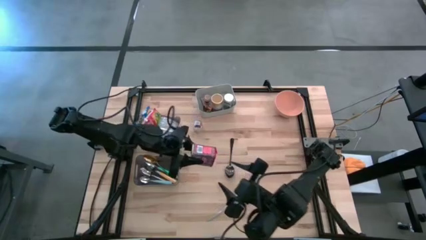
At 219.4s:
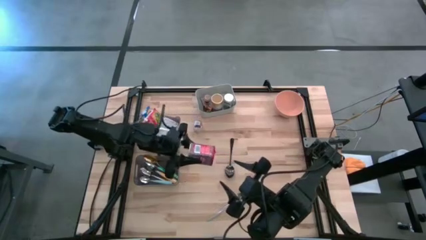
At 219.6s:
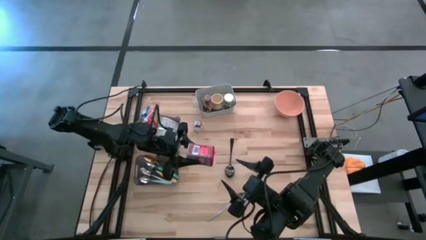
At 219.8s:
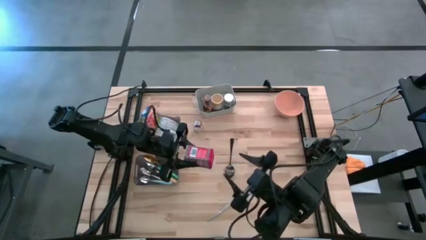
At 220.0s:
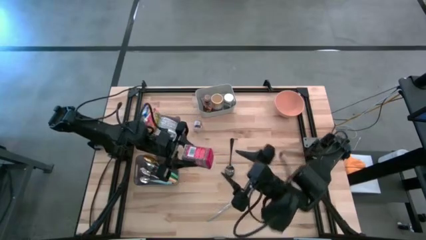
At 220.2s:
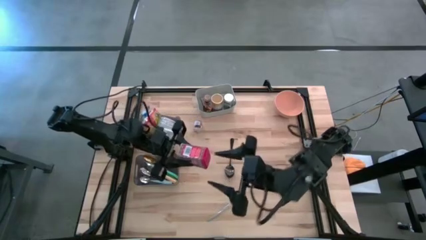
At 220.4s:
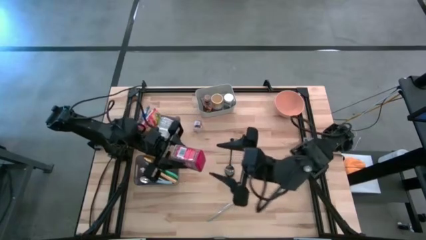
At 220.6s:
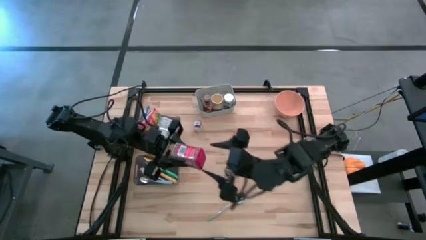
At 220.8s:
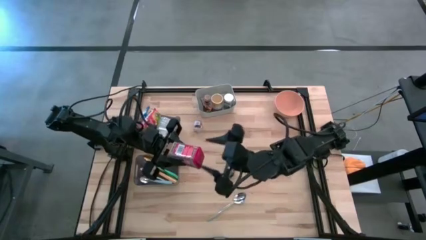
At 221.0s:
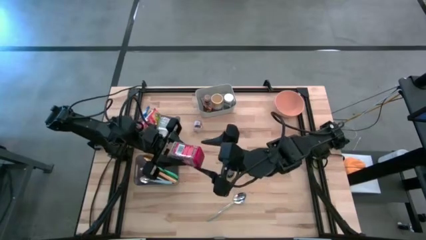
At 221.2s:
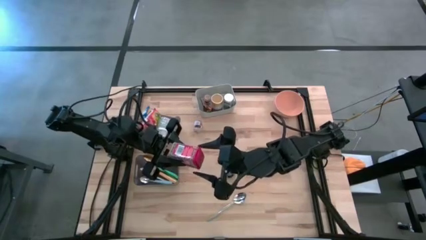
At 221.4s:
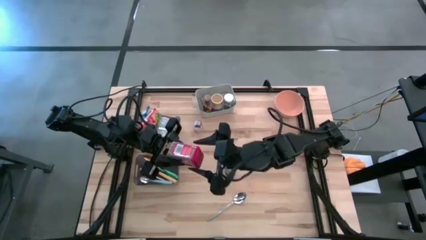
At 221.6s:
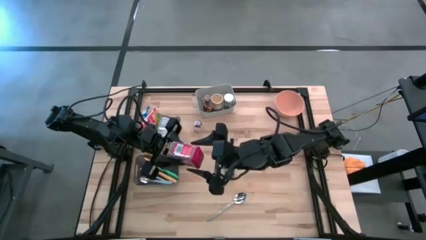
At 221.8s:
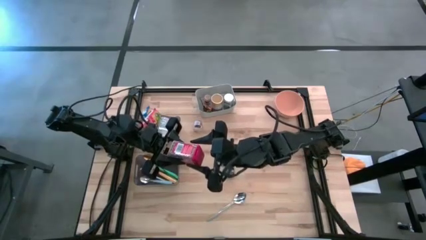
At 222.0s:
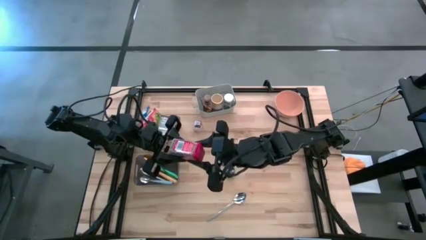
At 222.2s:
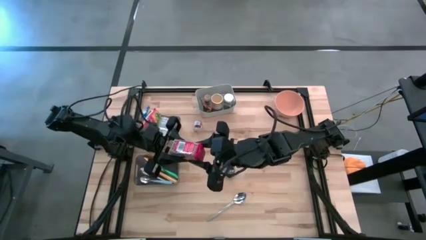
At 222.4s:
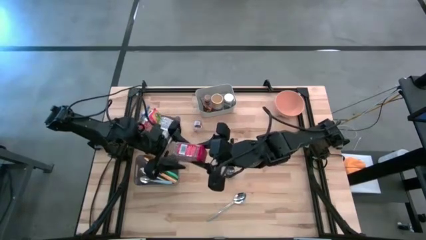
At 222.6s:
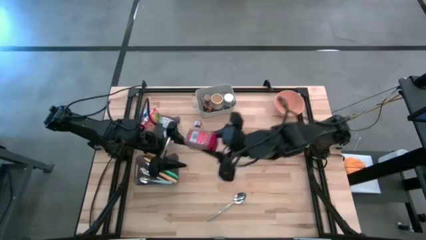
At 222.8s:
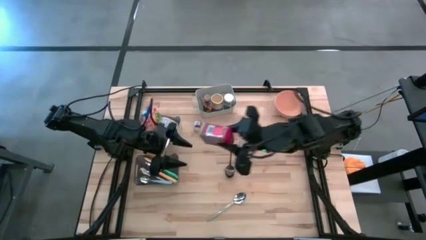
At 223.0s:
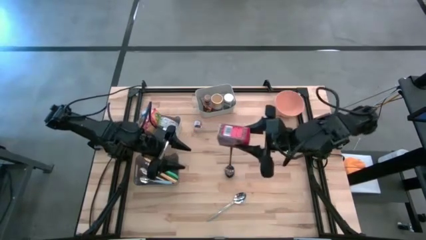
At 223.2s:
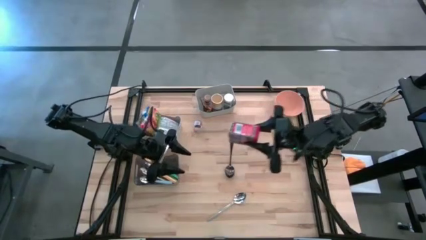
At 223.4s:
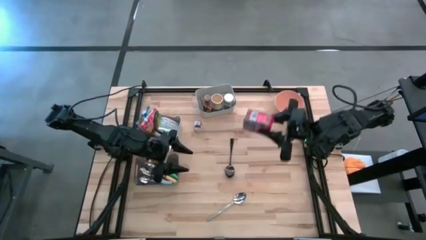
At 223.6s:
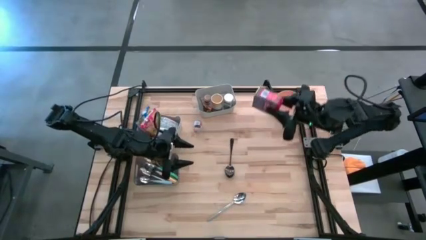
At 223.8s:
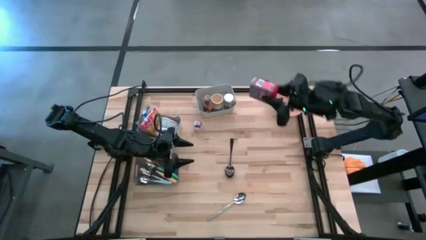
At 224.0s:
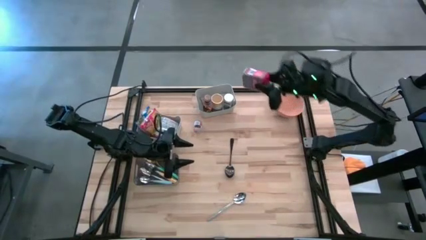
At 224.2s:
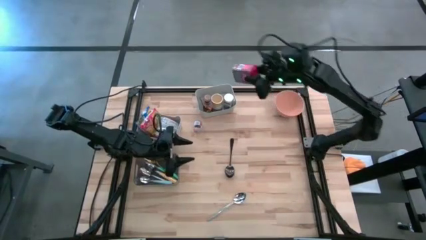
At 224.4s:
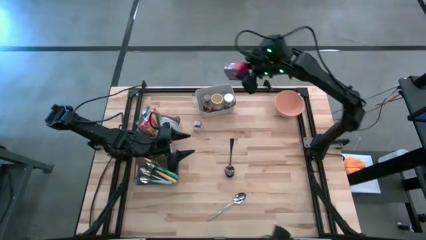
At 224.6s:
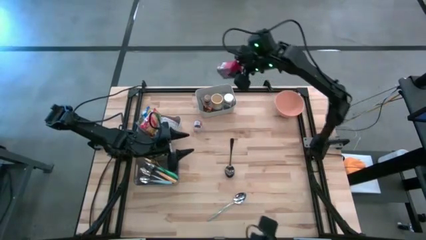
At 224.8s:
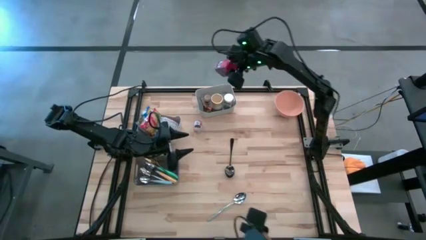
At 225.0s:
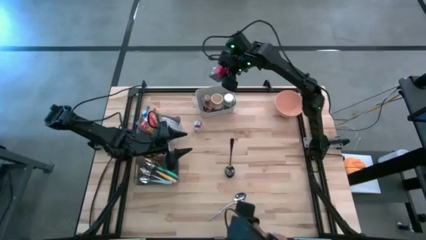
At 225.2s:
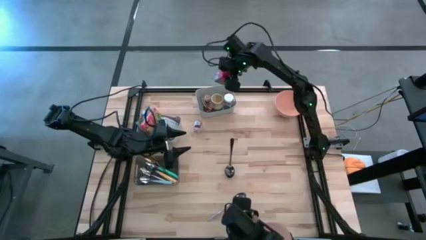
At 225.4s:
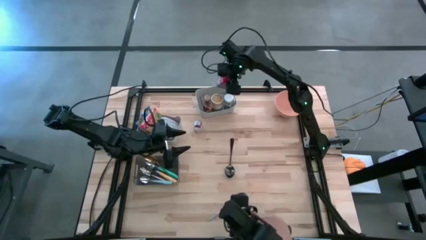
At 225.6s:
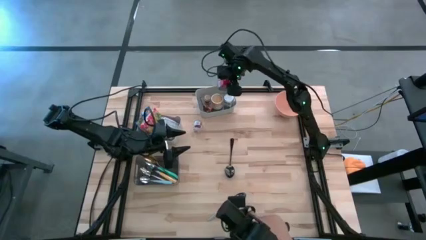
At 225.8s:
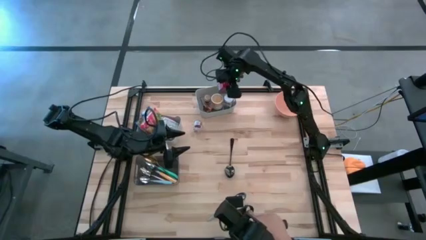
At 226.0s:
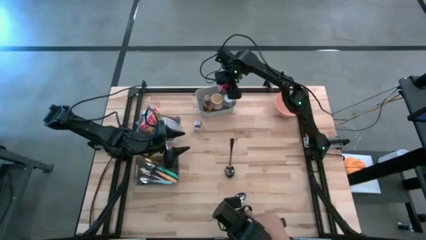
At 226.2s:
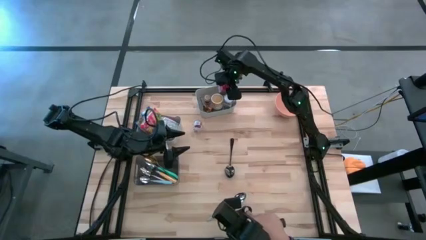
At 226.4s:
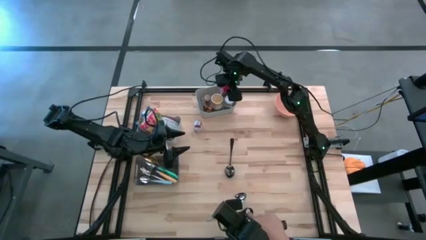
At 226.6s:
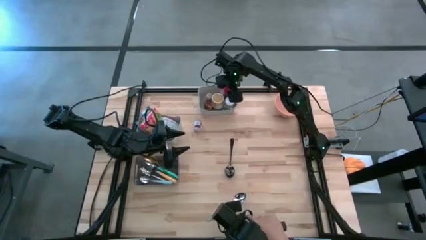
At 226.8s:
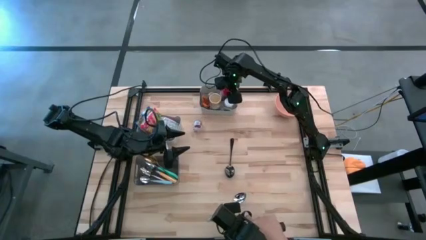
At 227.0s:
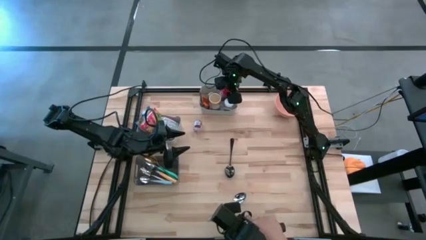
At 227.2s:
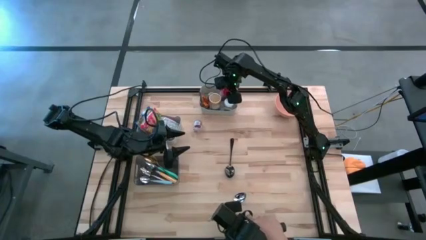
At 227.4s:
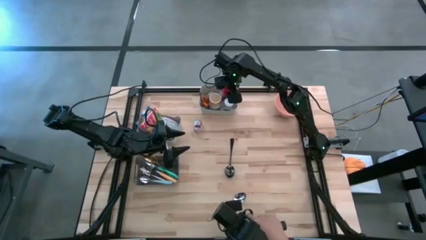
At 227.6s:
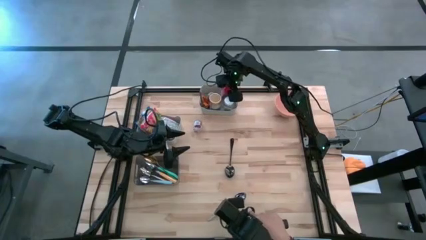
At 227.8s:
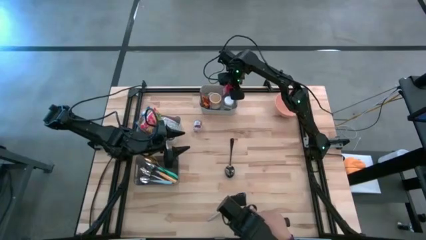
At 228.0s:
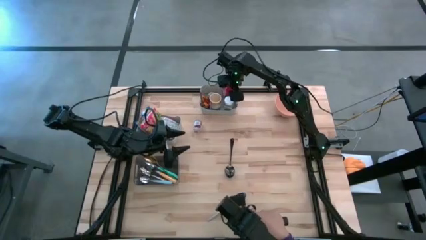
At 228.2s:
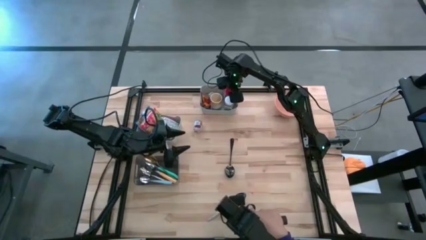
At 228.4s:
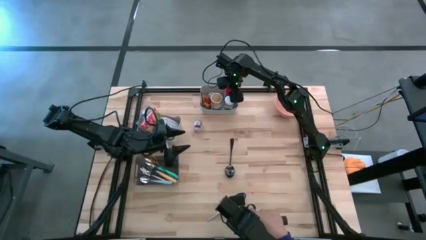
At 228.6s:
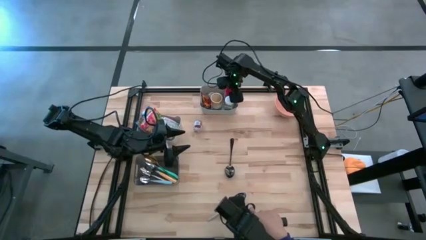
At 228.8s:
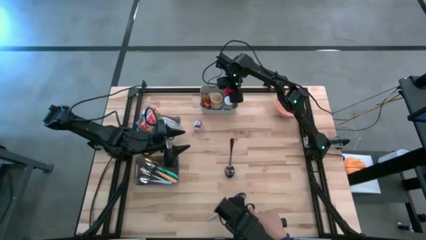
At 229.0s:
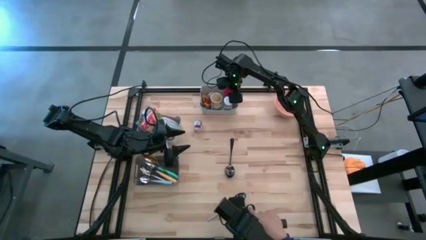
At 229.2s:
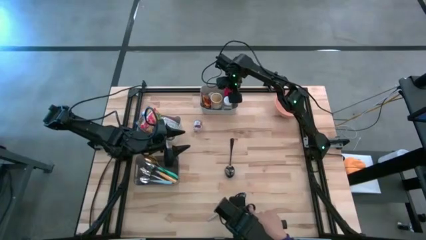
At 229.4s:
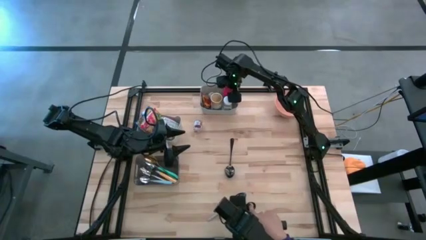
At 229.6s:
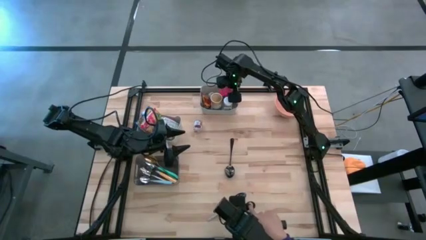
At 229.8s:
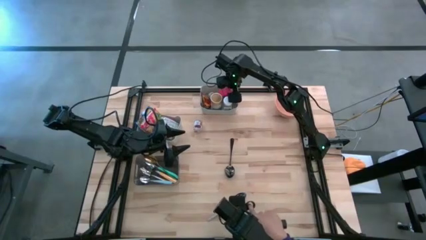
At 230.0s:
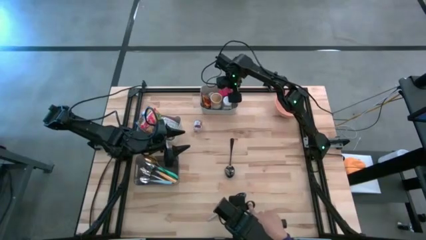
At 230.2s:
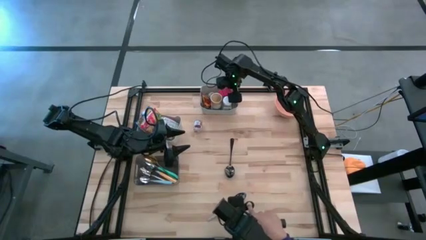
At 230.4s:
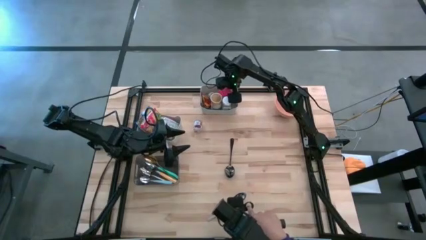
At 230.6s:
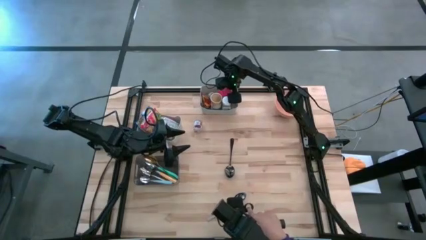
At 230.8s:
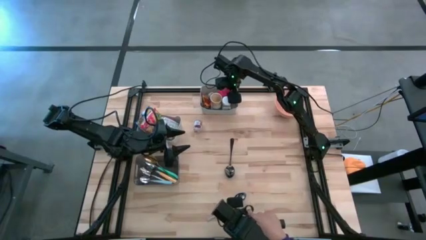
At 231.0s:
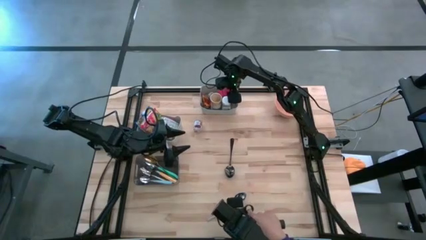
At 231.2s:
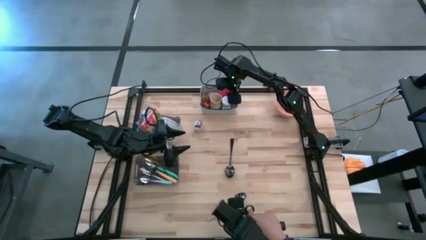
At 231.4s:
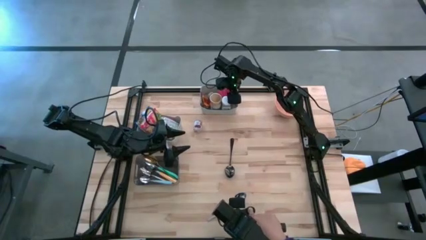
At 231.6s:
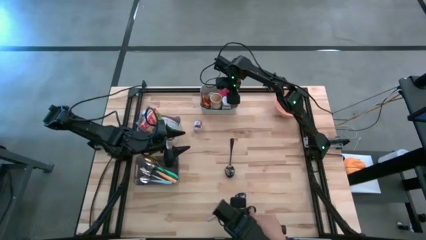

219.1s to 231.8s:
Put the red spice can into the top gray bin
